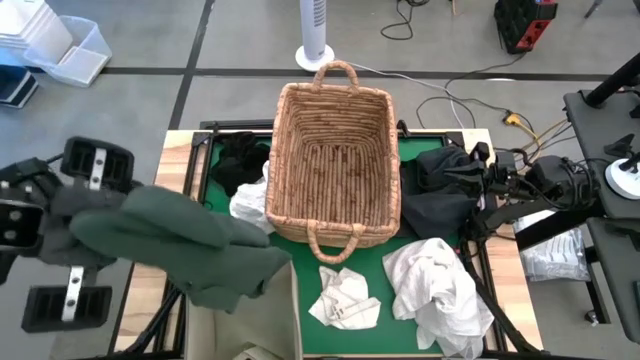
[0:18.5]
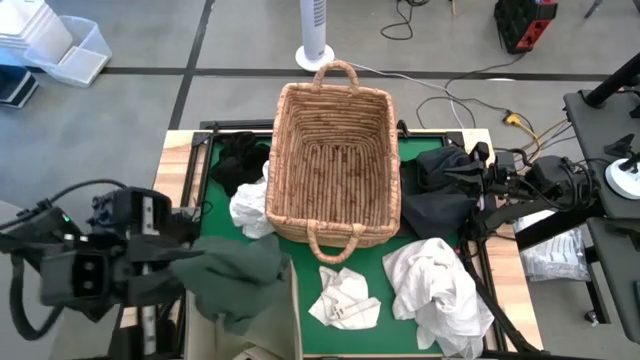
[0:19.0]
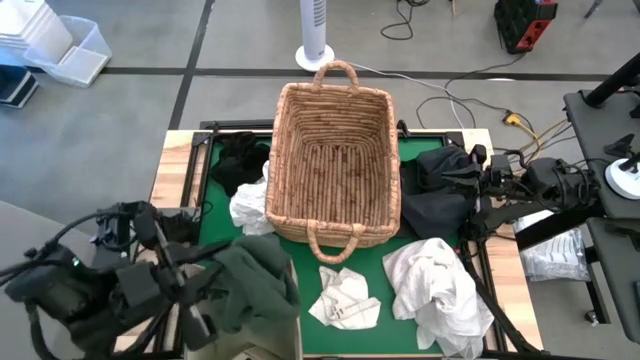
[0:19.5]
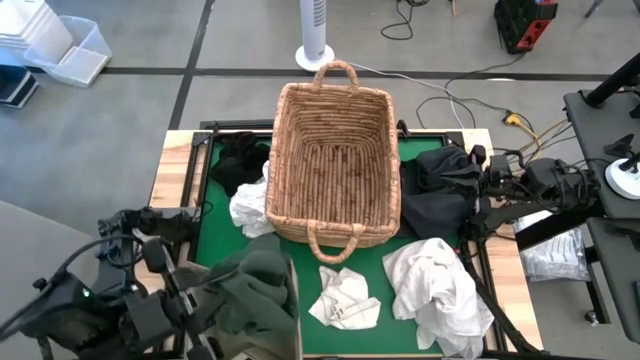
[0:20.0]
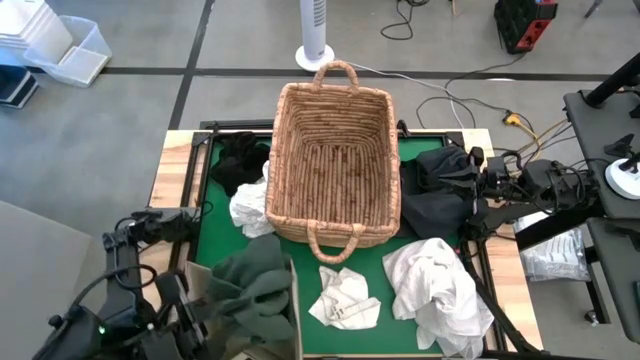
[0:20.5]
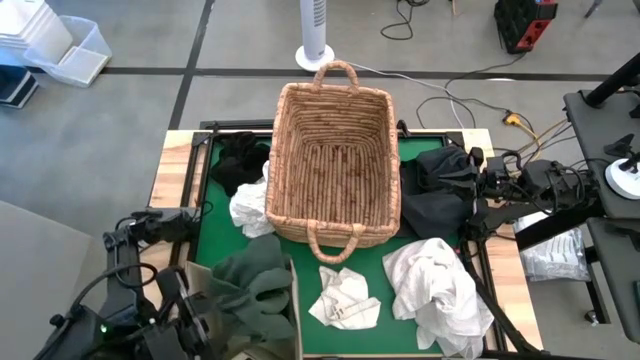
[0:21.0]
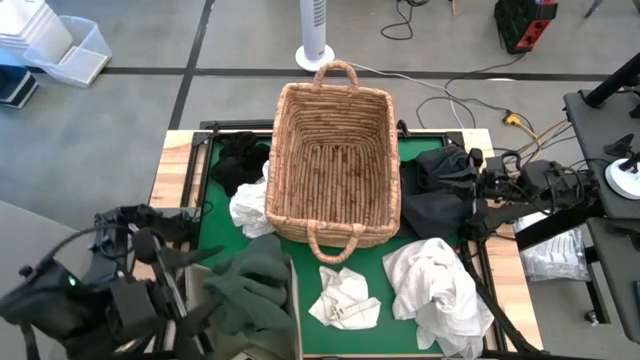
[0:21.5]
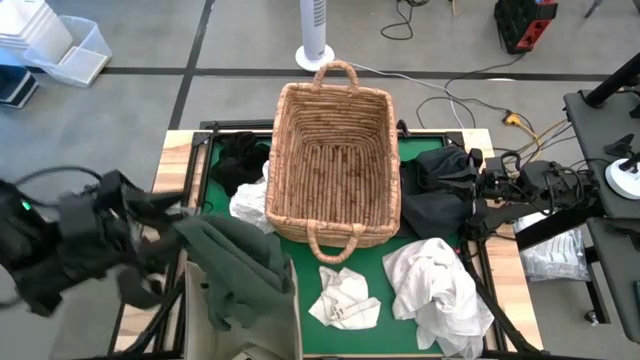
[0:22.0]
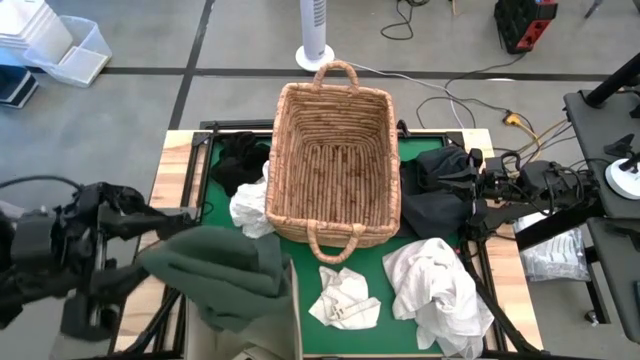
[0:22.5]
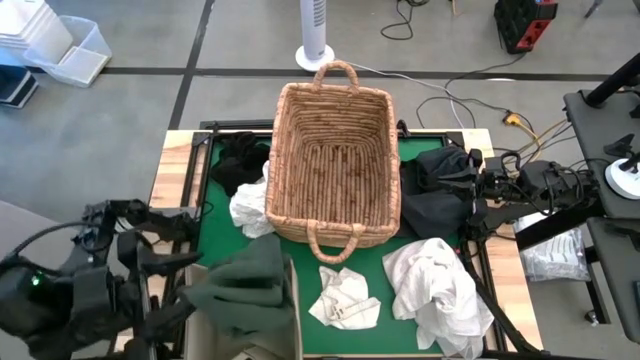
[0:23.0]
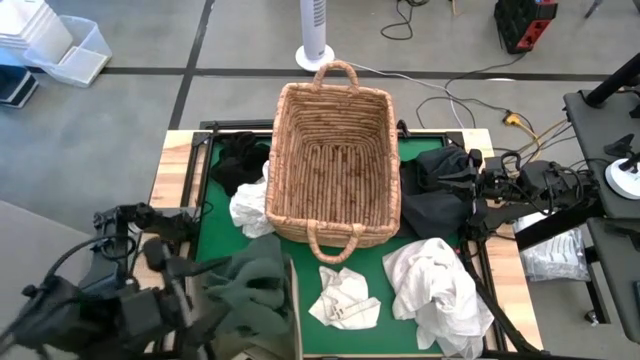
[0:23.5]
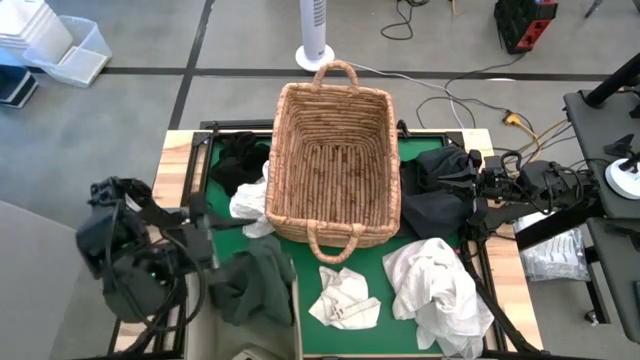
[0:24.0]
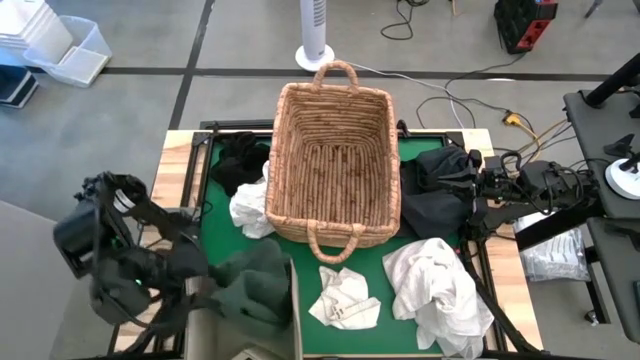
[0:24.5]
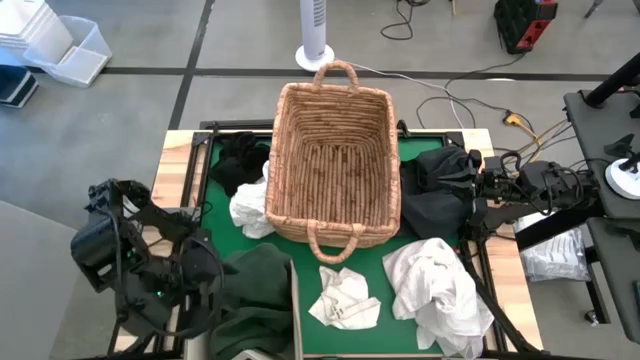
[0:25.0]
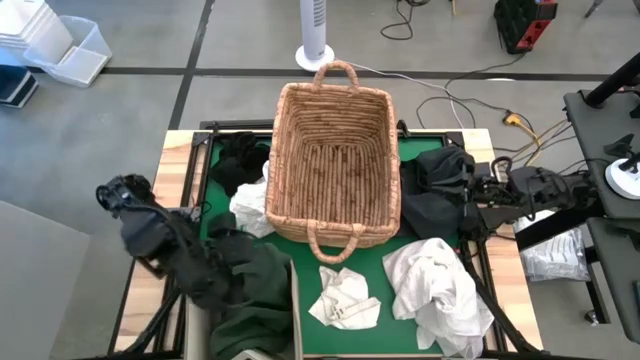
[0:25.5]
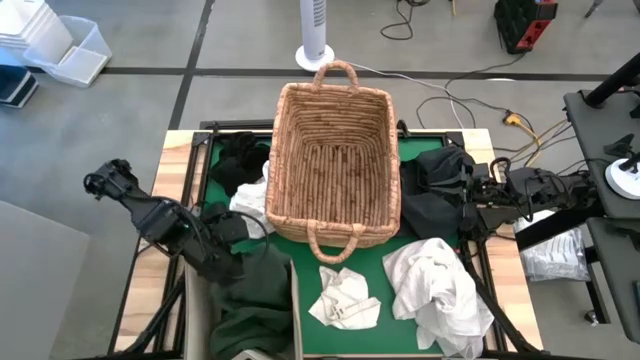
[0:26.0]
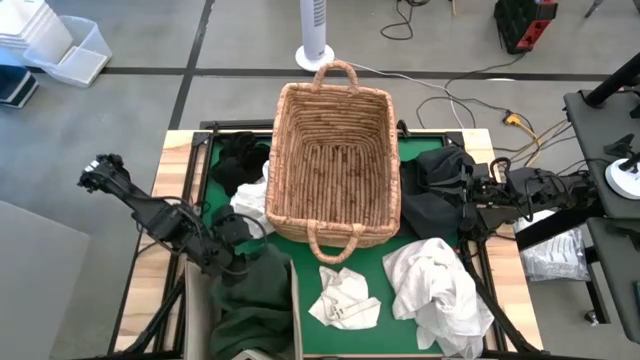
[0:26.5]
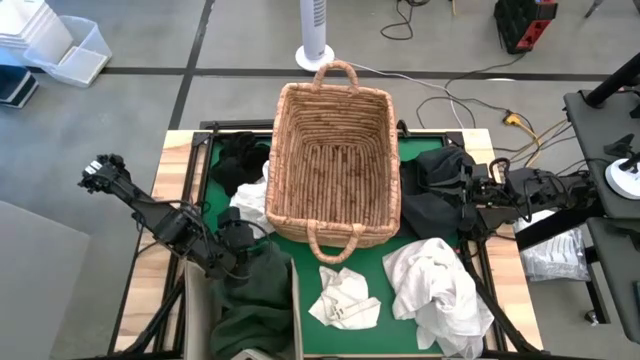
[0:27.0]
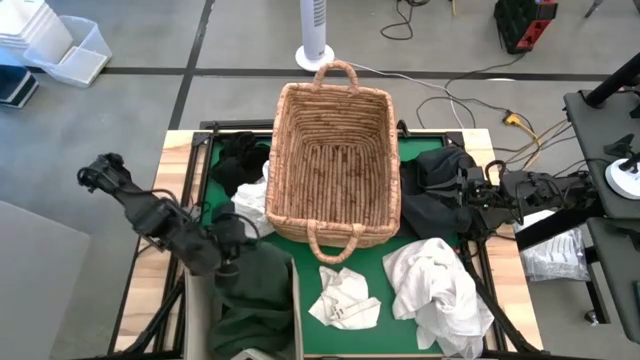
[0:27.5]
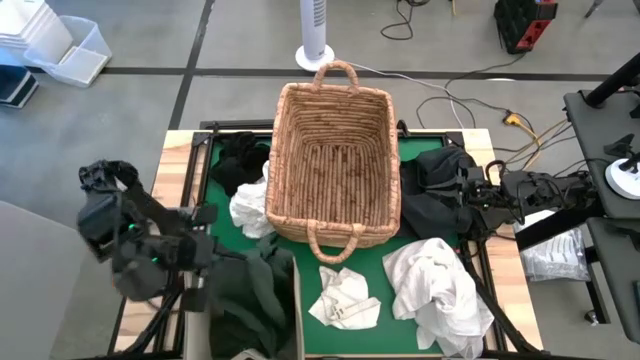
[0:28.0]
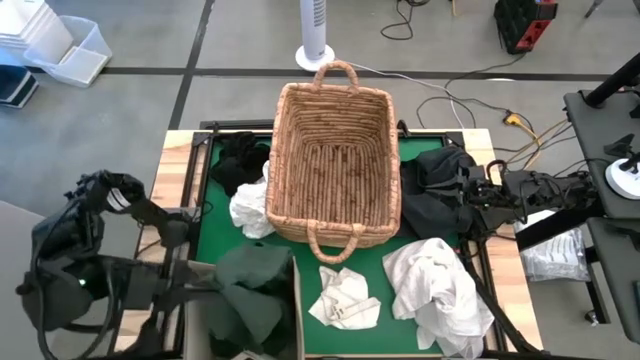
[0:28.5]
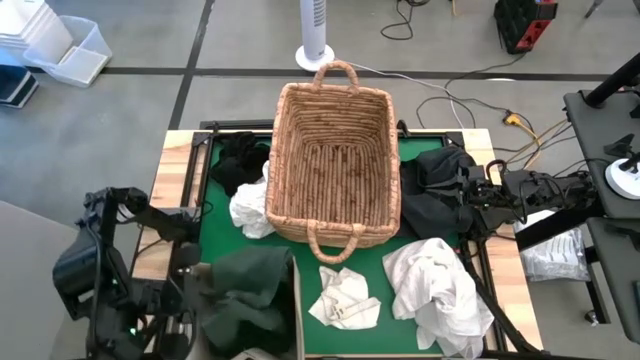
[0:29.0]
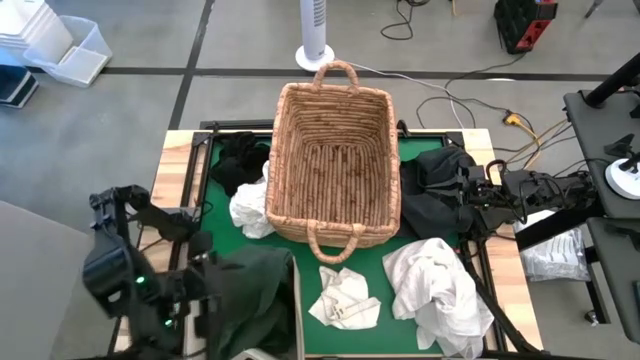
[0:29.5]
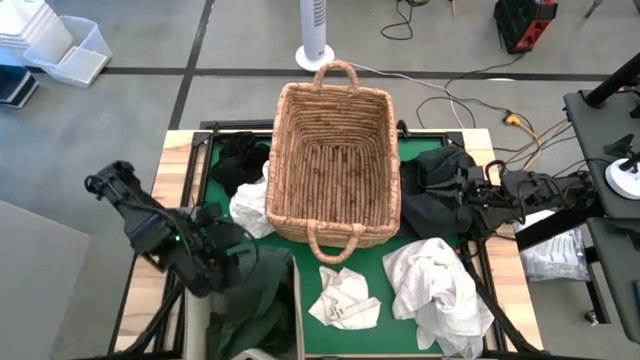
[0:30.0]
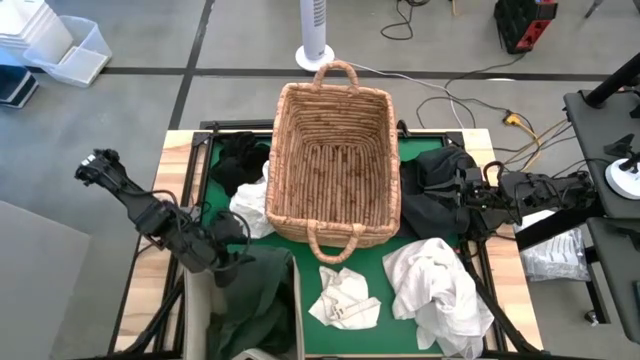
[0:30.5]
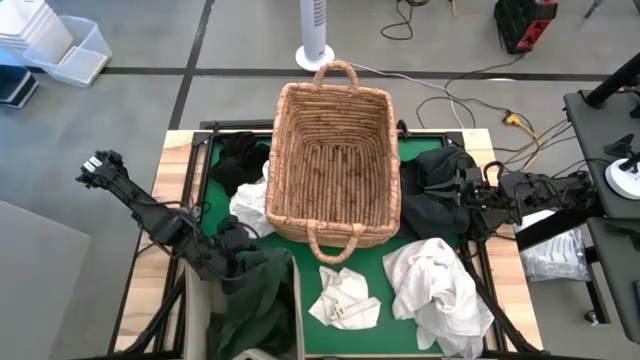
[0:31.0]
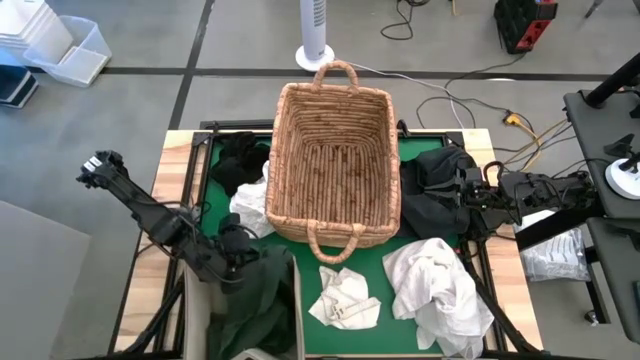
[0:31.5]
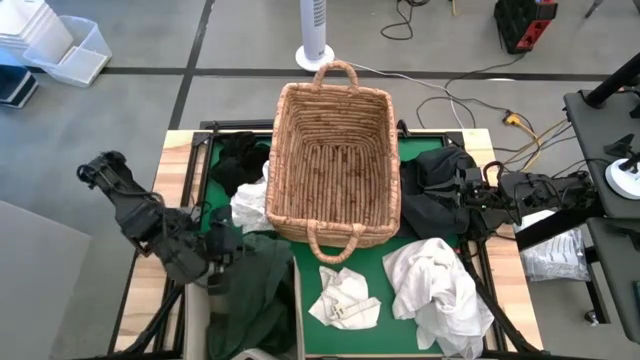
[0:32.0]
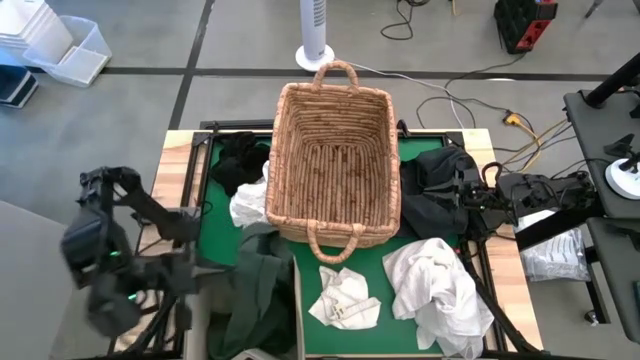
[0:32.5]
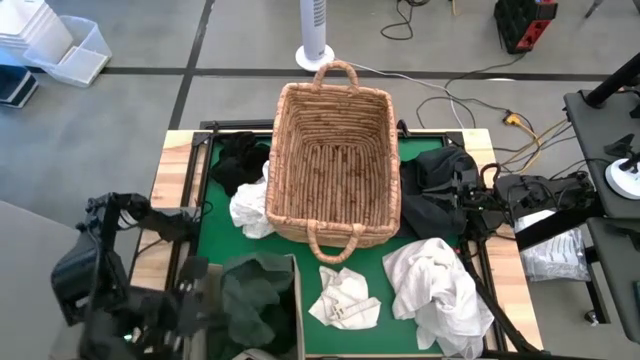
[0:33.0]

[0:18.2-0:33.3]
Put the green shirt into the gray laundry bin
